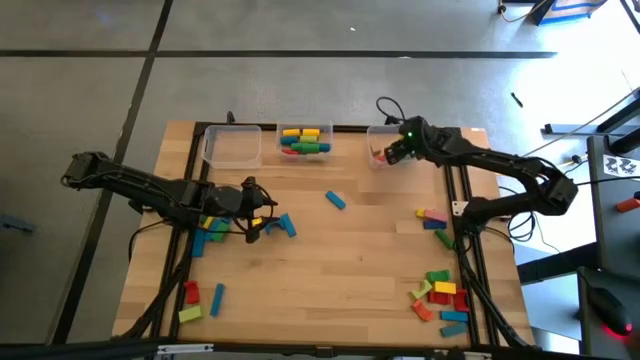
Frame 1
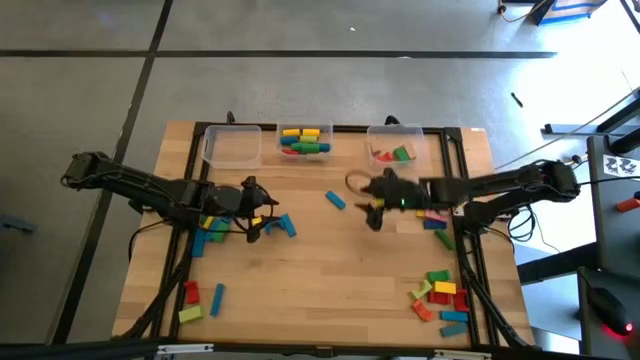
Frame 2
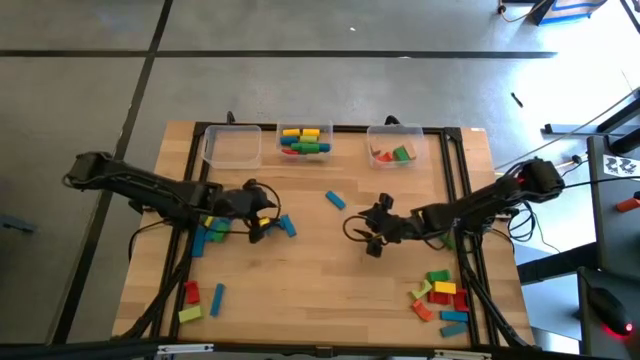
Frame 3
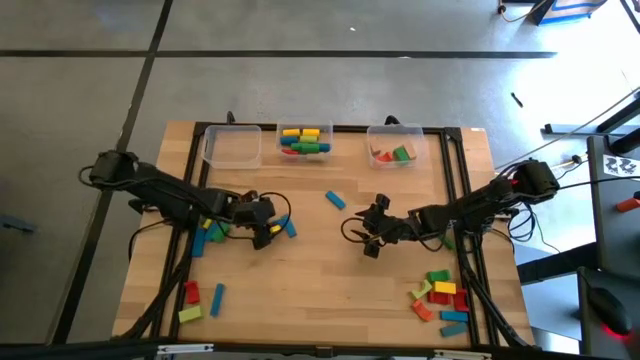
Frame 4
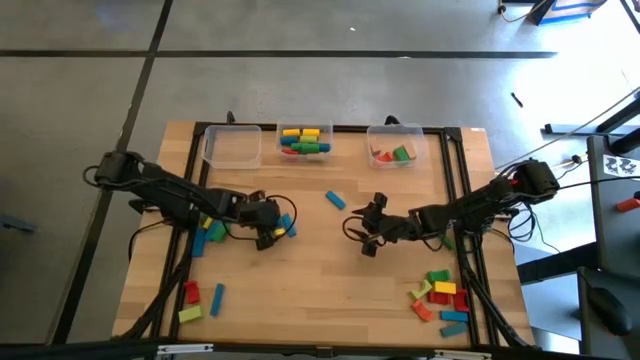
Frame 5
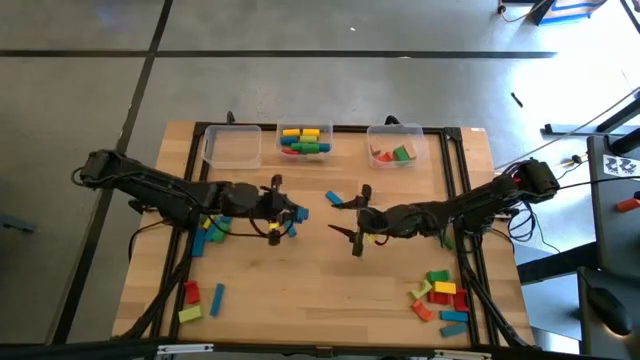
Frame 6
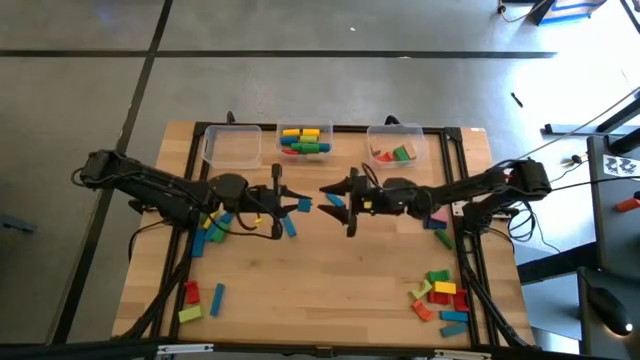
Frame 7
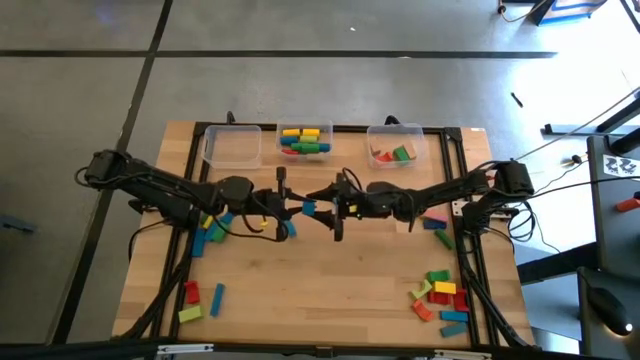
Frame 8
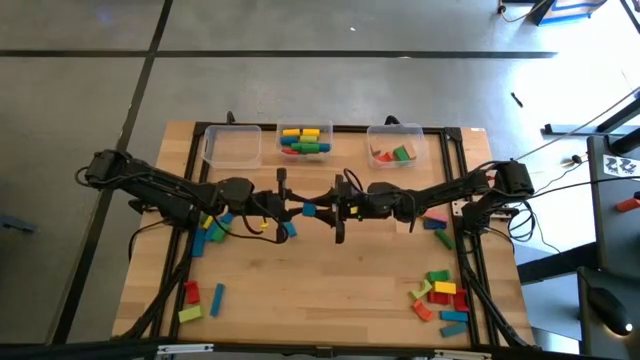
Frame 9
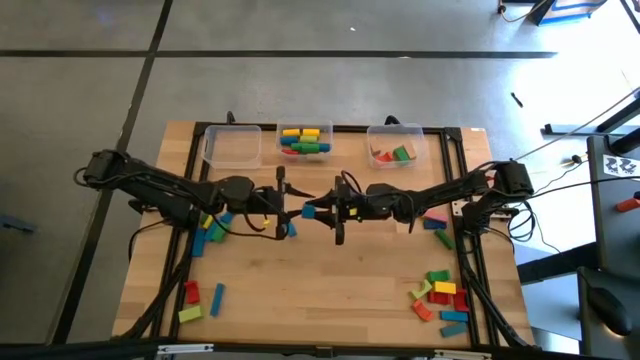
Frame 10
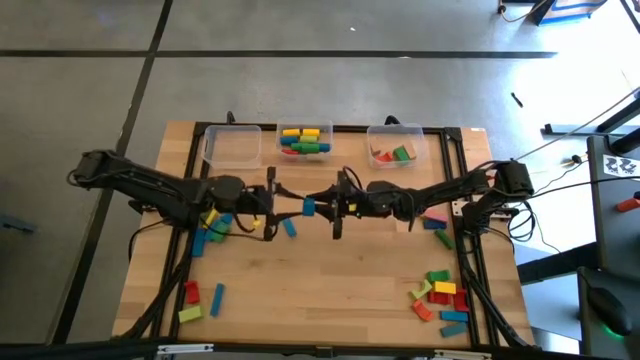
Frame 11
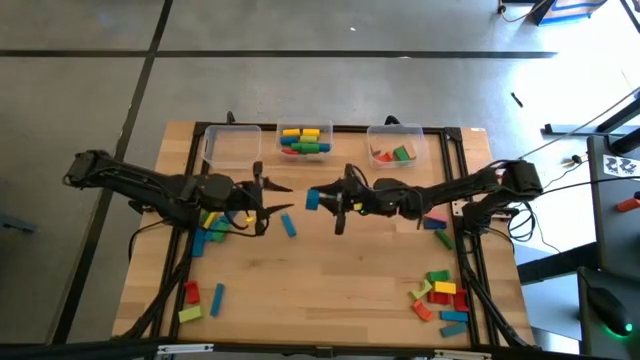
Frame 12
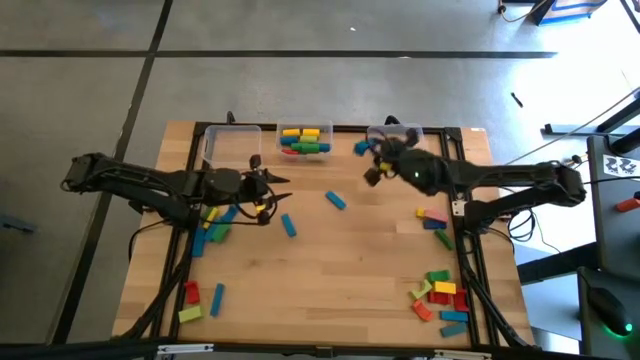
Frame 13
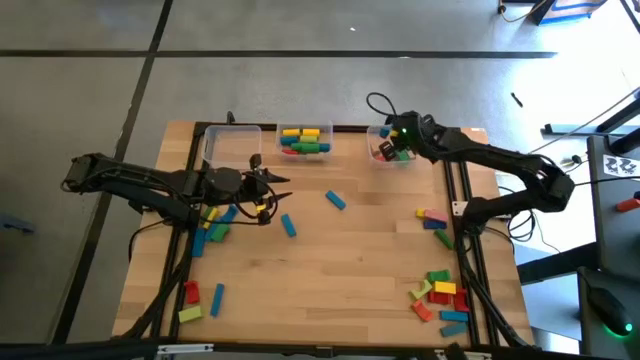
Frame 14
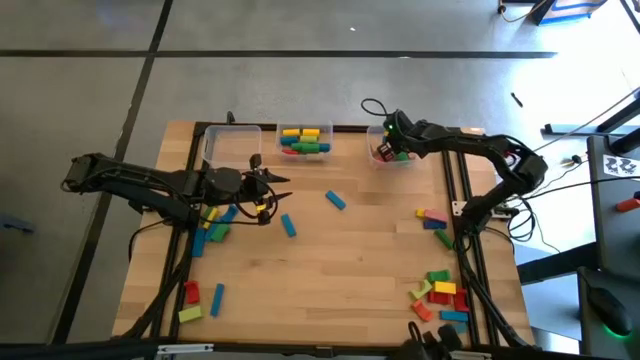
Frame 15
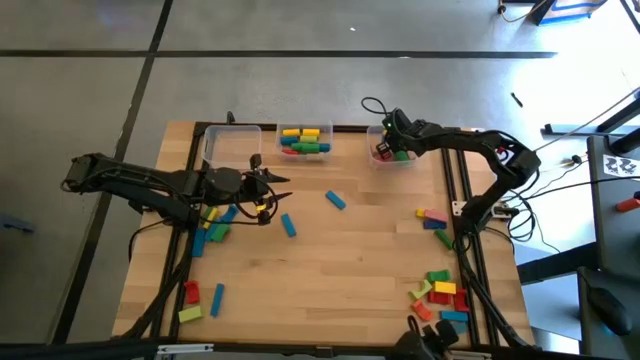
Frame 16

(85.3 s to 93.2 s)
Task: Sort blocks by size
Put the blue arch block into the right transparent bin

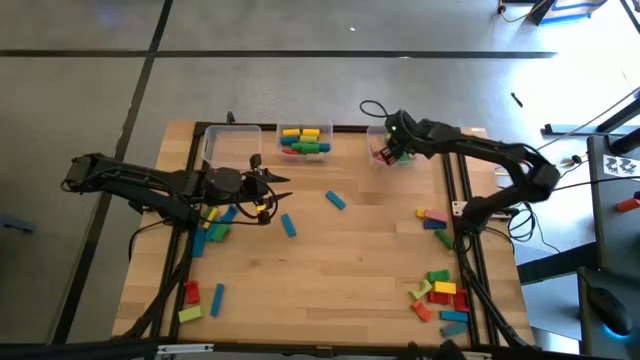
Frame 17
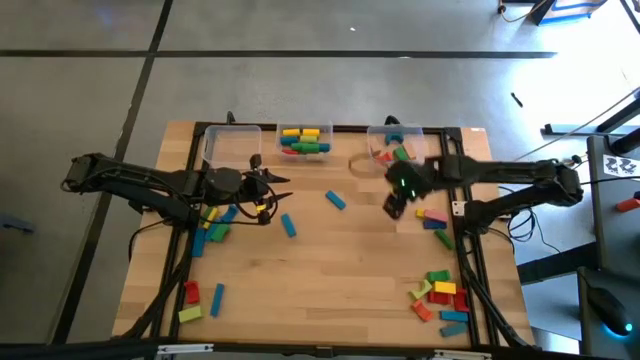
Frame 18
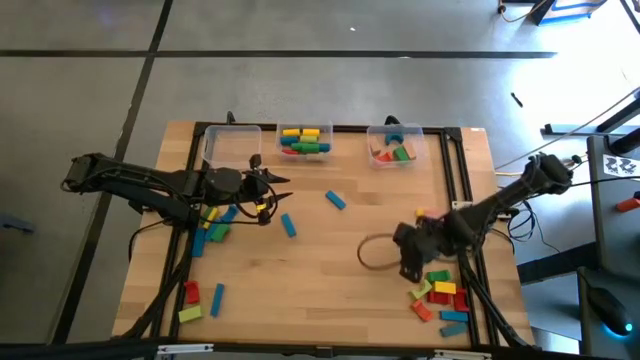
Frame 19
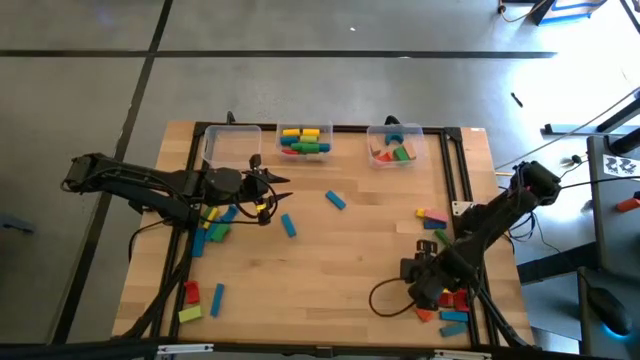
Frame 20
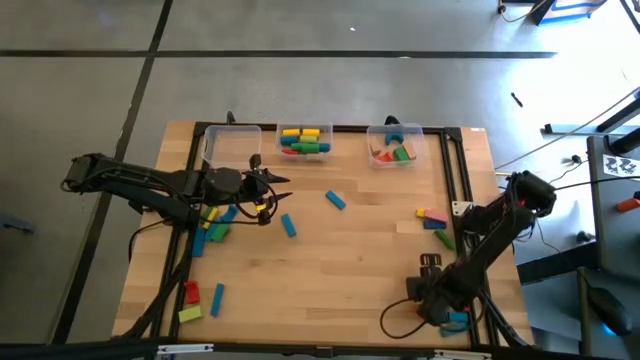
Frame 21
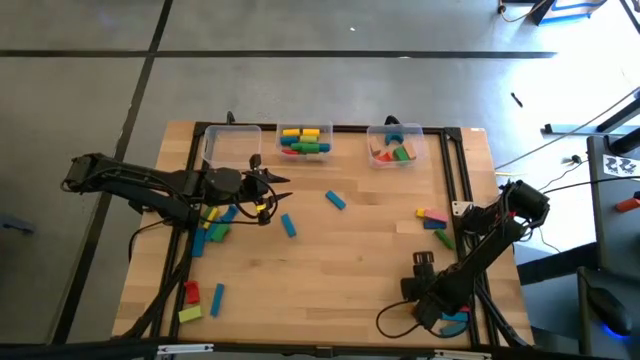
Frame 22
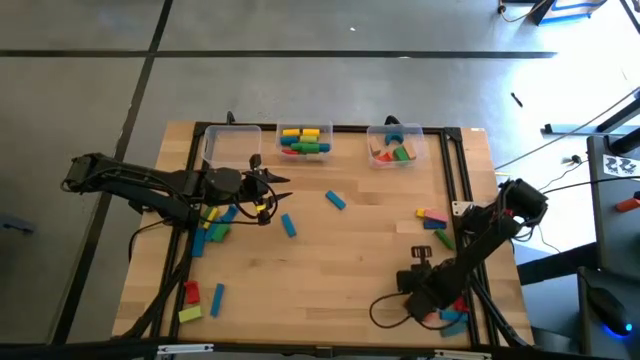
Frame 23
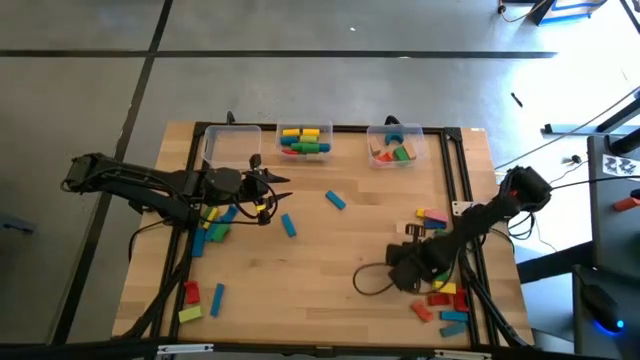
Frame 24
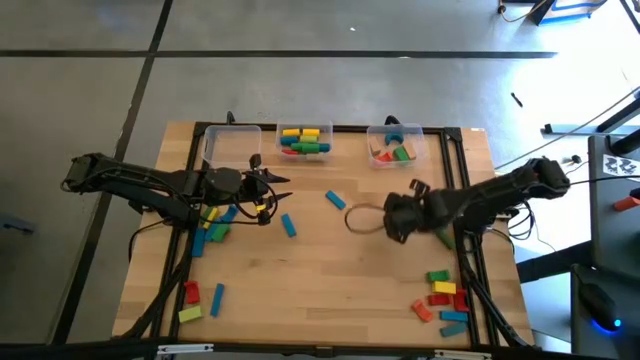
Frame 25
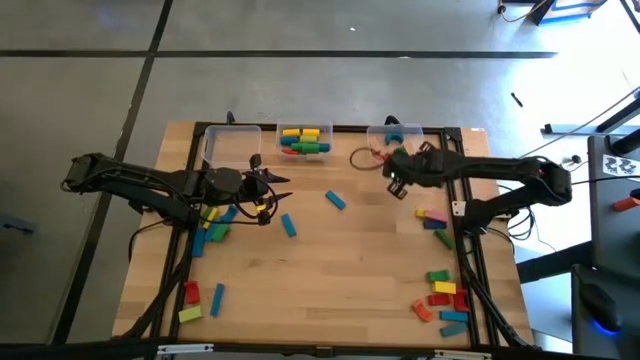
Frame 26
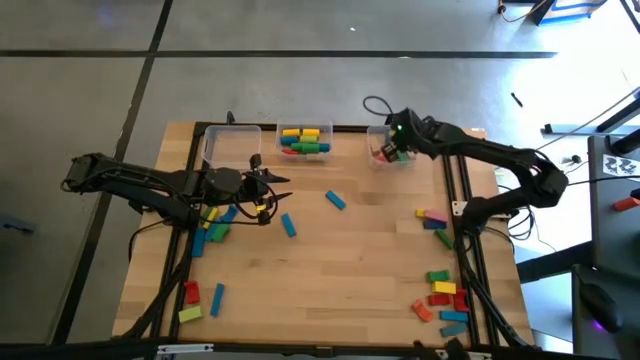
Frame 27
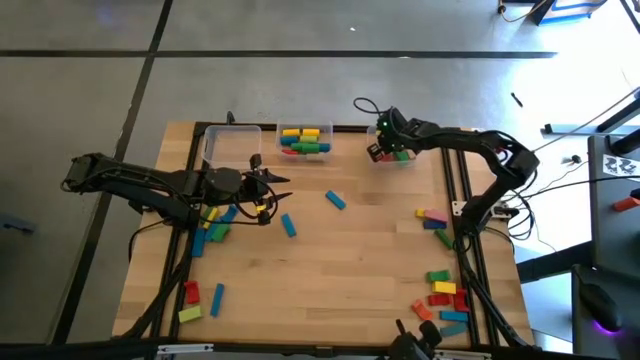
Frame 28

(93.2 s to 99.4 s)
Put the light green arch block into the right transparent bin

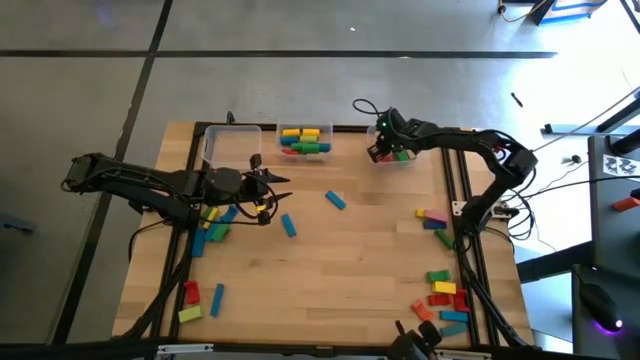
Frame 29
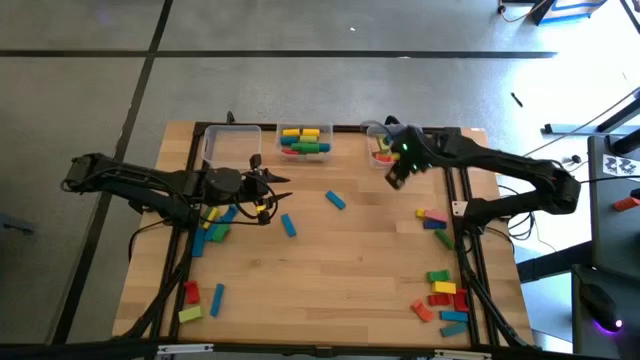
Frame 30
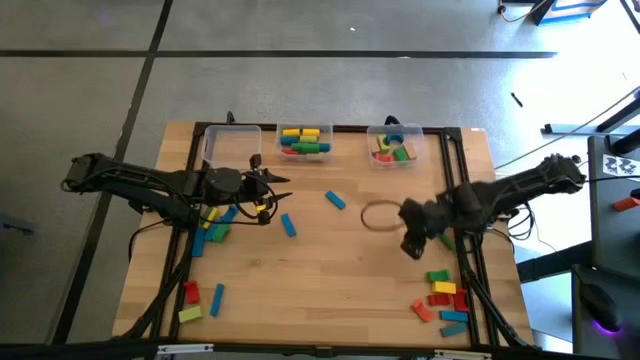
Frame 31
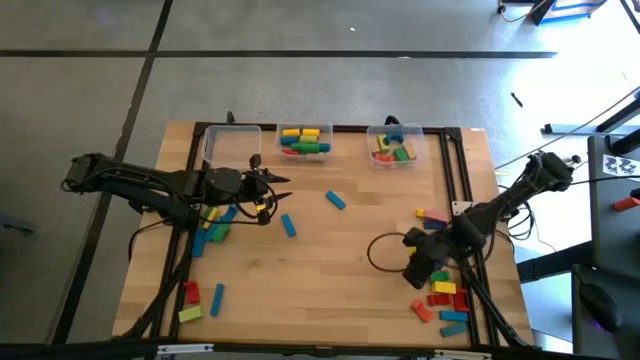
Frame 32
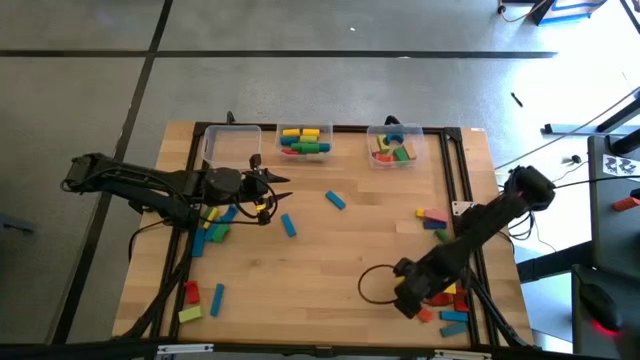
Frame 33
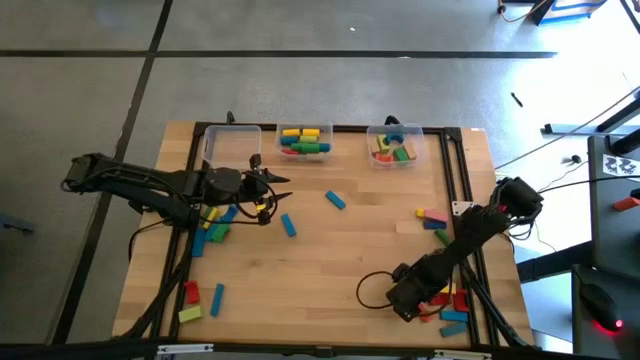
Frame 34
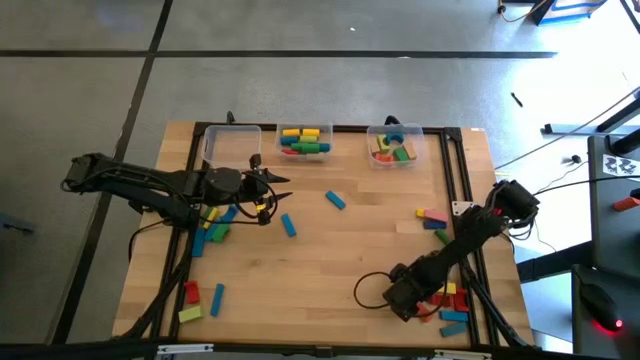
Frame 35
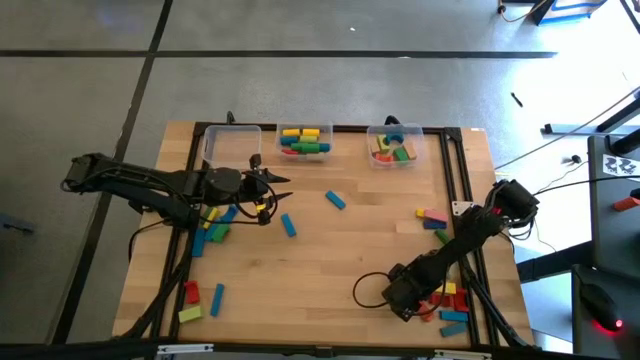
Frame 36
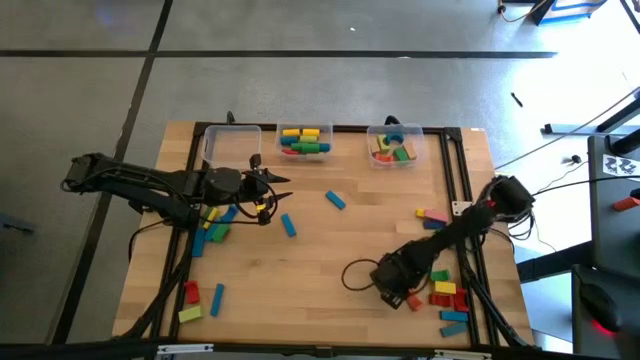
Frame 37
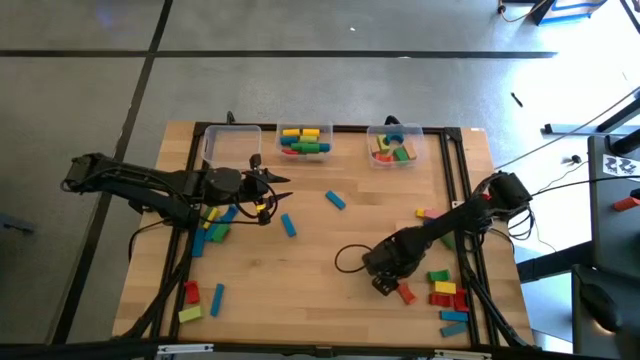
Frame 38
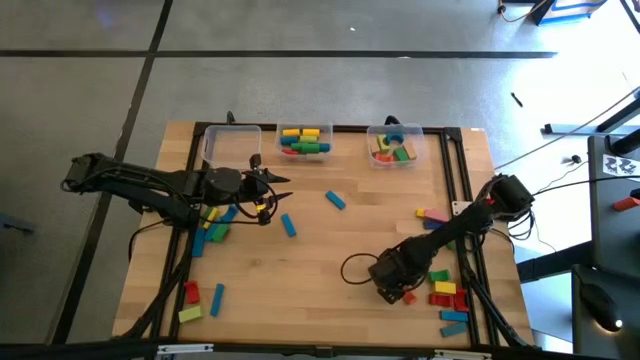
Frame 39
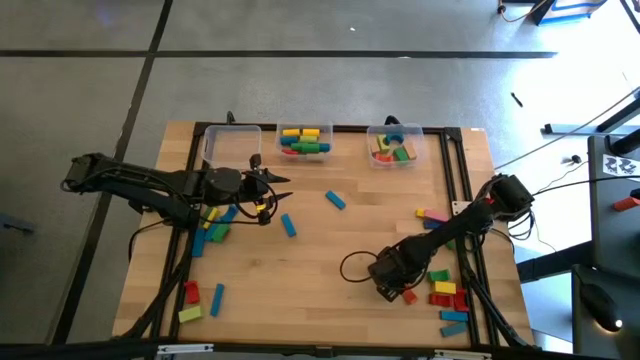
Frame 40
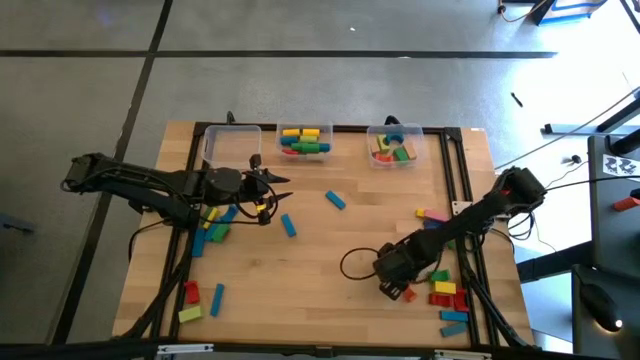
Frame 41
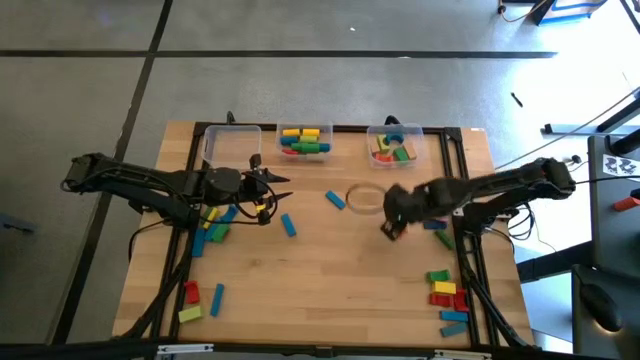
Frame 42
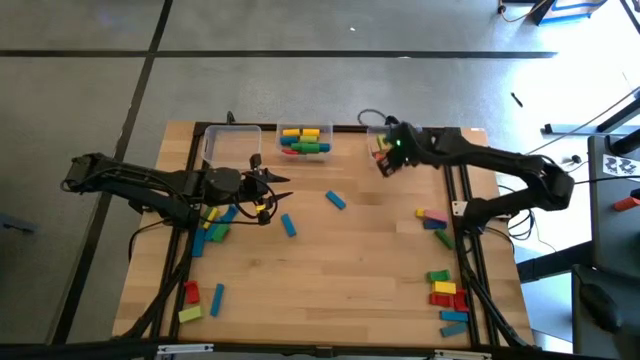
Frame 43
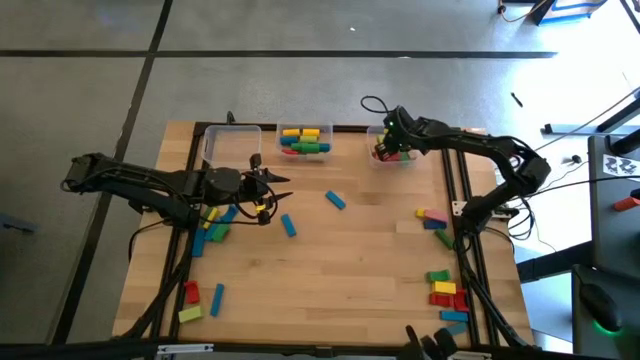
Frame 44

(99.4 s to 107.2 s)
Put the orange arch block into the right transparent bin
